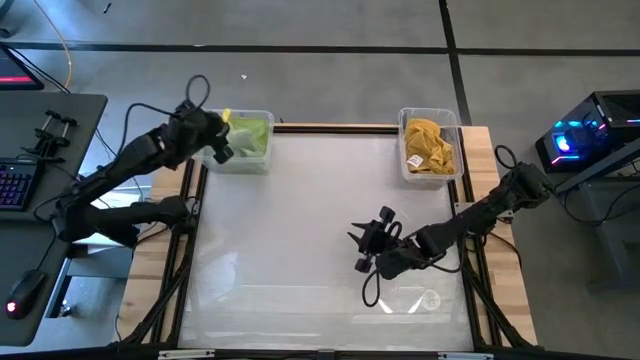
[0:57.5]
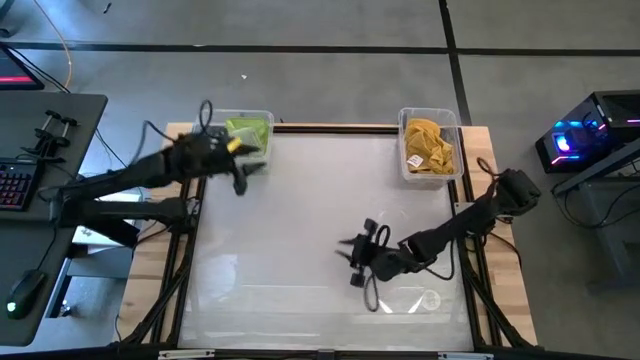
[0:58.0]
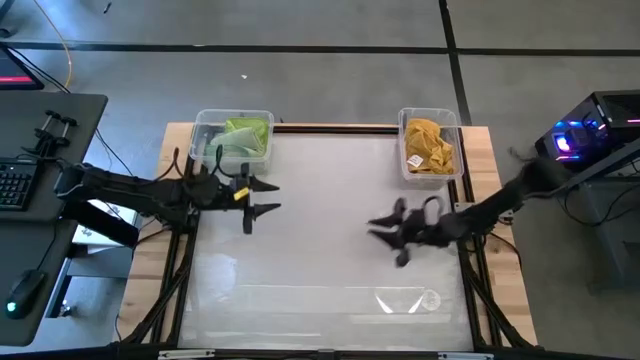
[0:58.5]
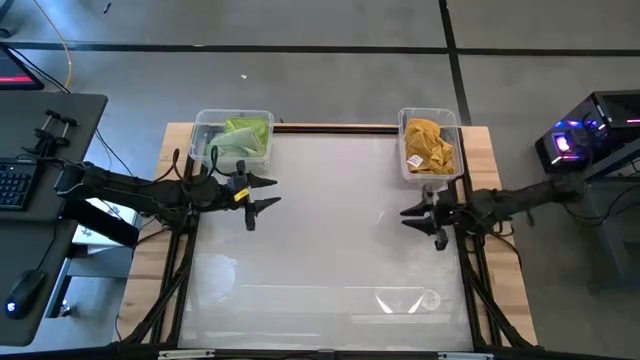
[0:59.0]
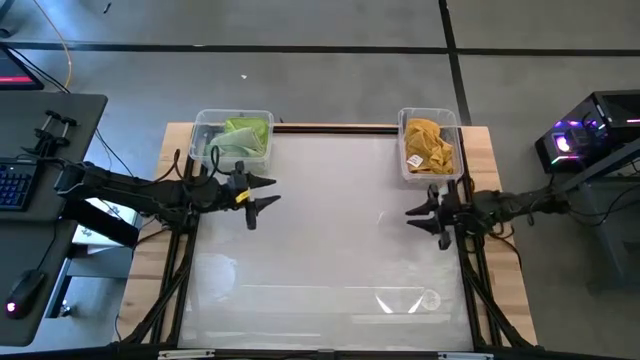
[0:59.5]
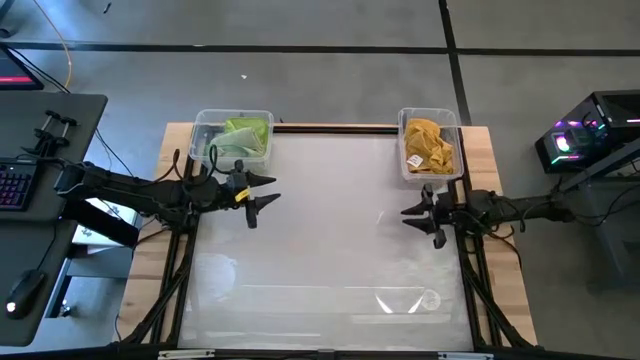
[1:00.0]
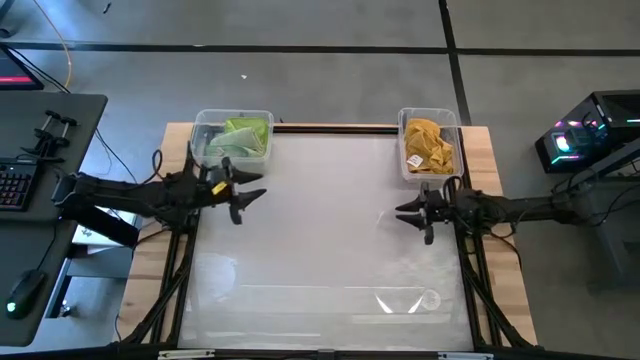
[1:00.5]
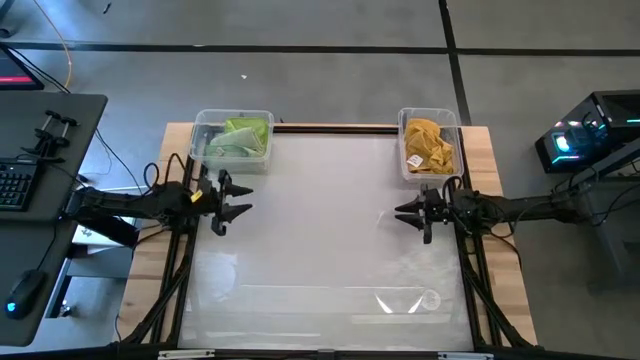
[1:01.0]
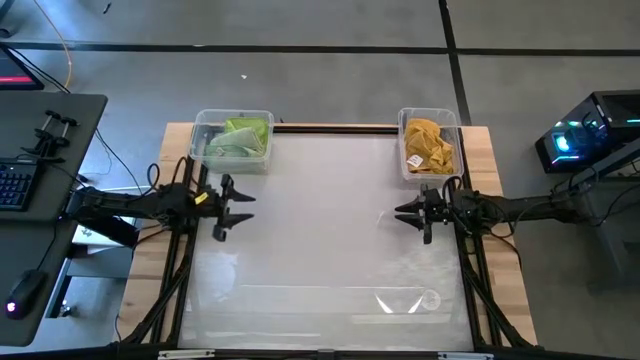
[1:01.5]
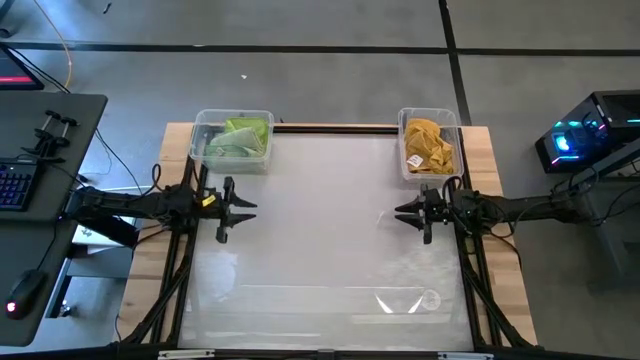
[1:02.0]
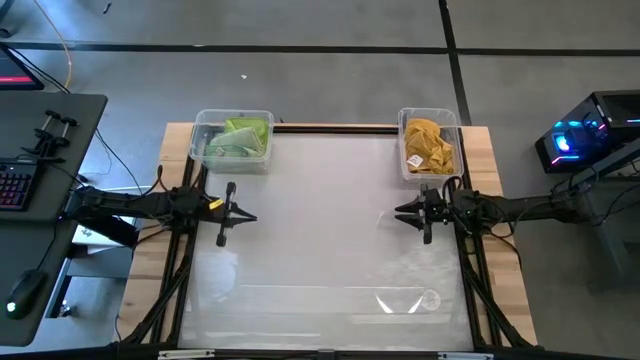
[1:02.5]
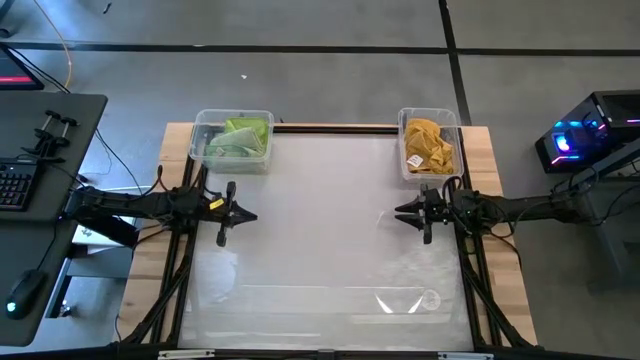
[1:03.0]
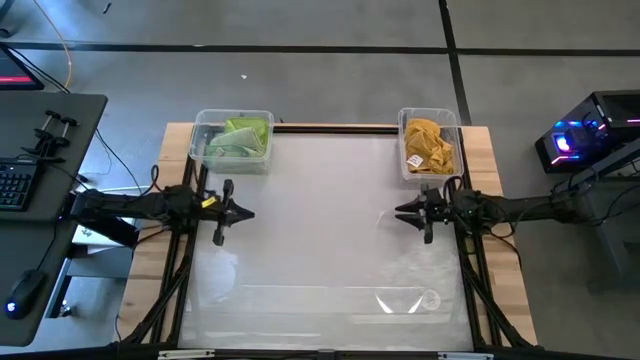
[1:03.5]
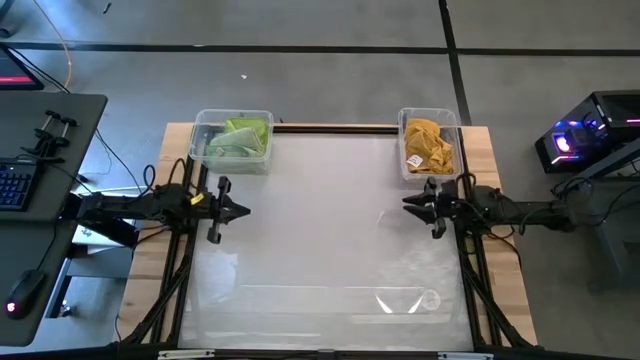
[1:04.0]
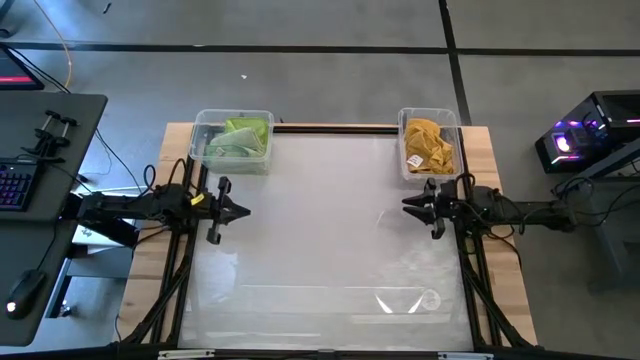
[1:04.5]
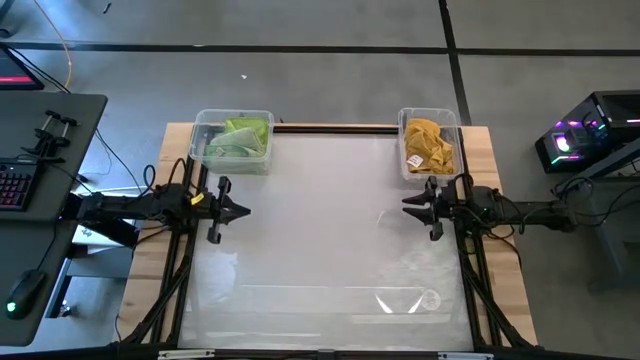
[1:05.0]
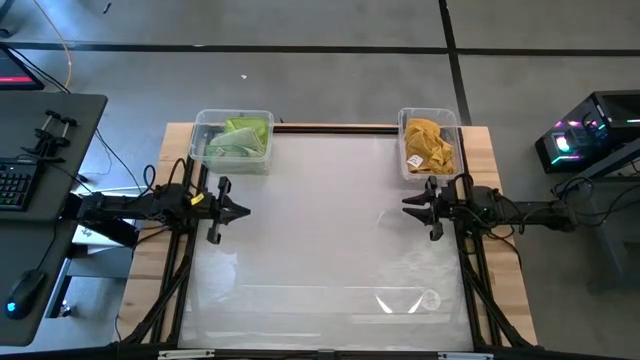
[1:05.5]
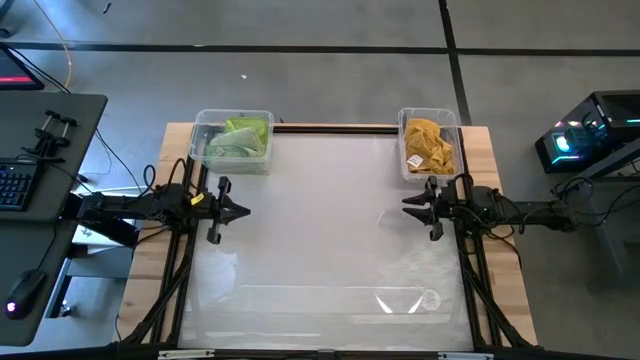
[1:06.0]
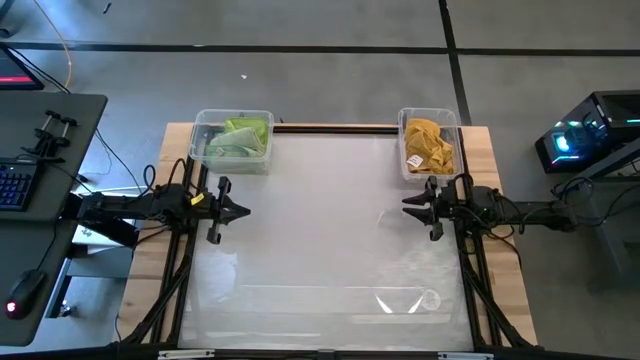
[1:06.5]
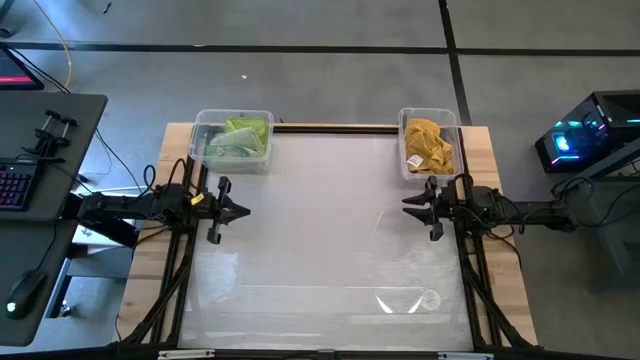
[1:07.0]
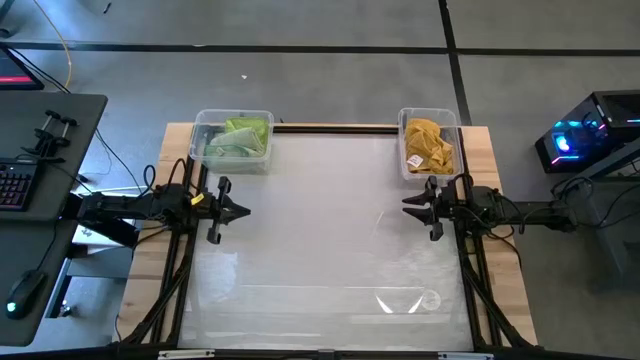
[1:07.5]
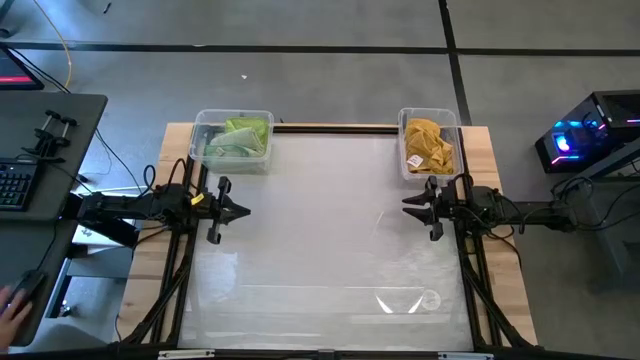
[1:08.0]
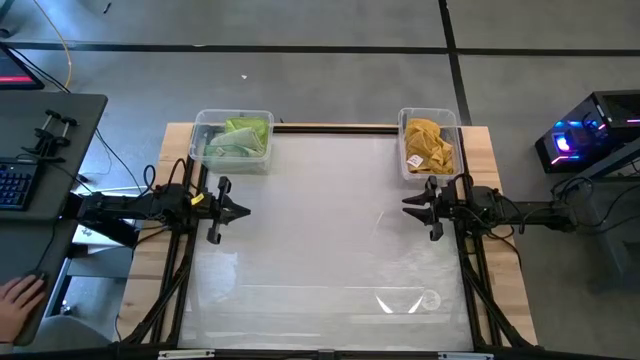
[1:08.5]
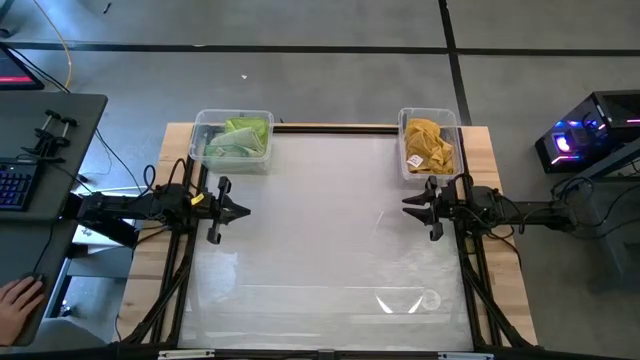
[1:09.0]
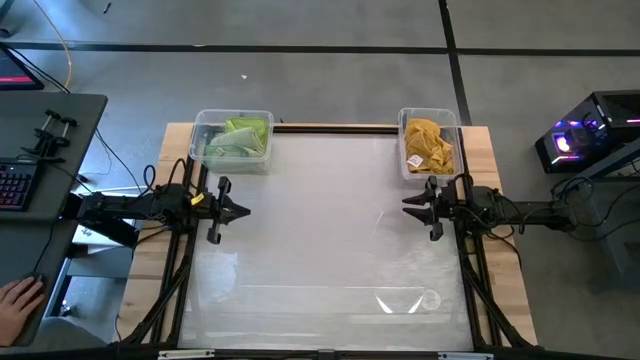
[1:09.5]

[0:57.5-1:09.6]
Task: Sort towels by color in basket
Return to Home Position

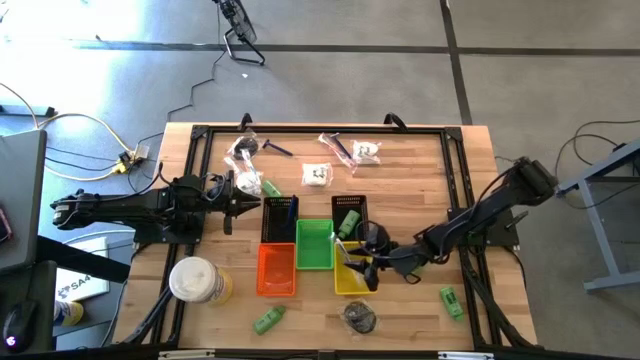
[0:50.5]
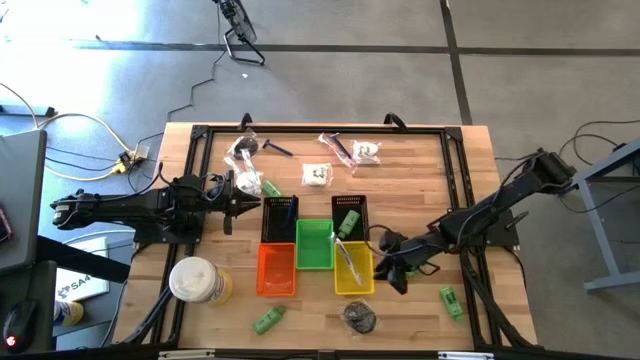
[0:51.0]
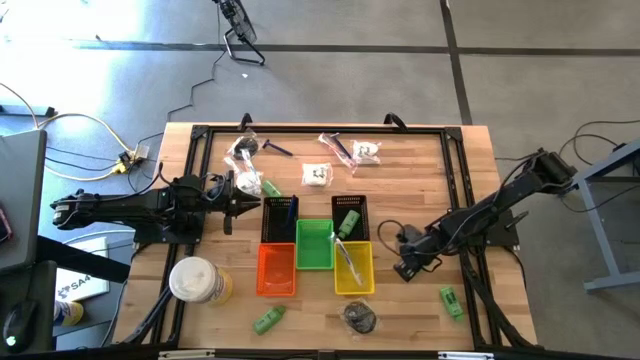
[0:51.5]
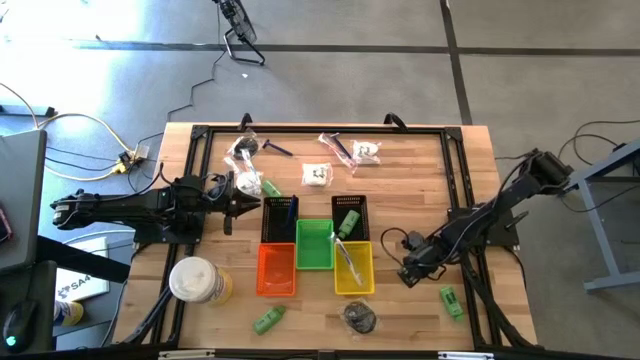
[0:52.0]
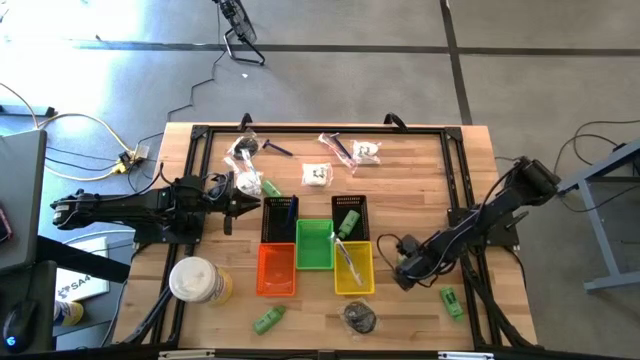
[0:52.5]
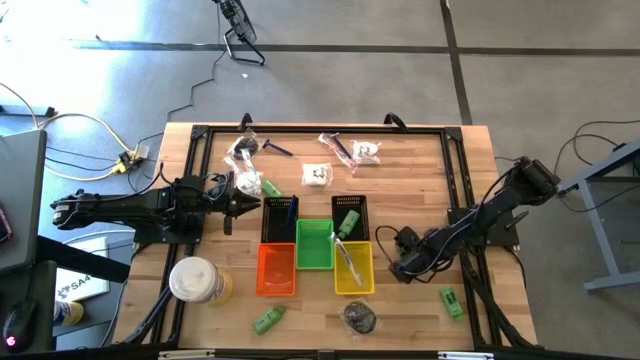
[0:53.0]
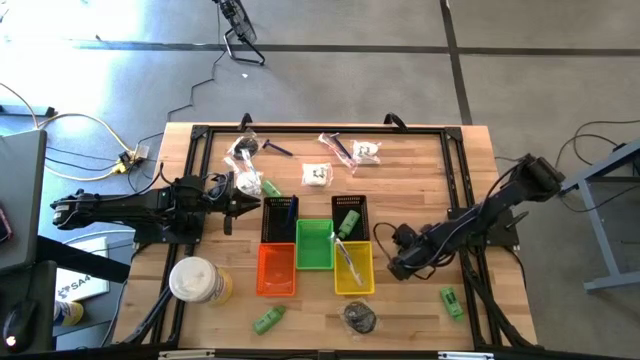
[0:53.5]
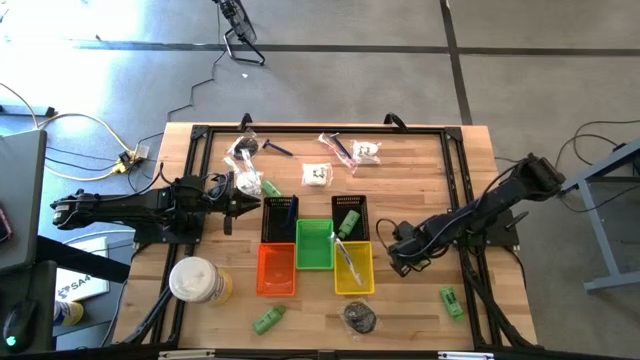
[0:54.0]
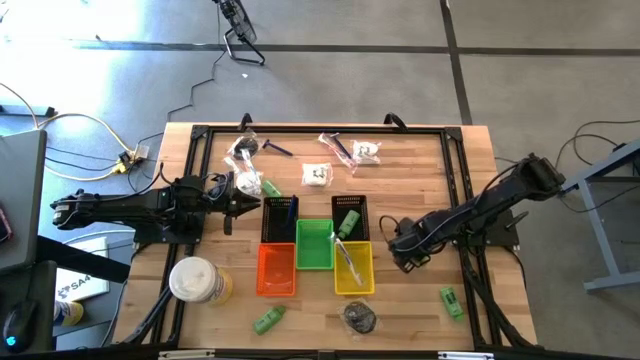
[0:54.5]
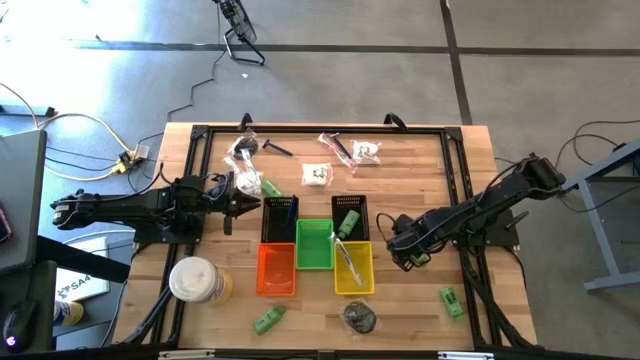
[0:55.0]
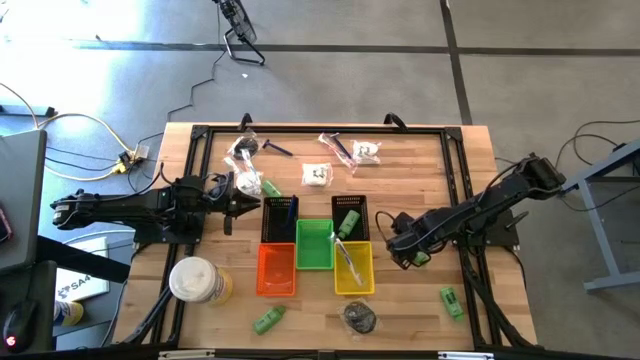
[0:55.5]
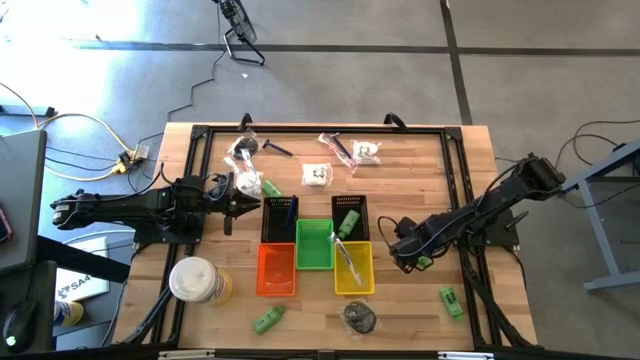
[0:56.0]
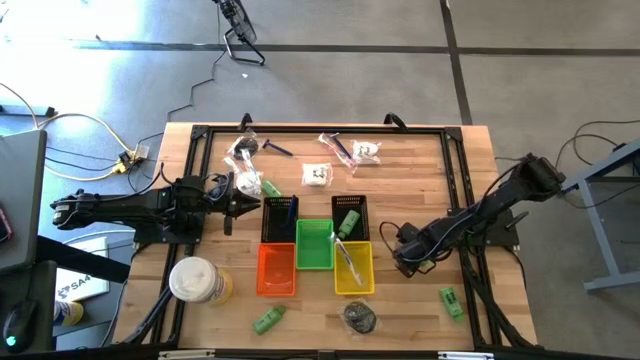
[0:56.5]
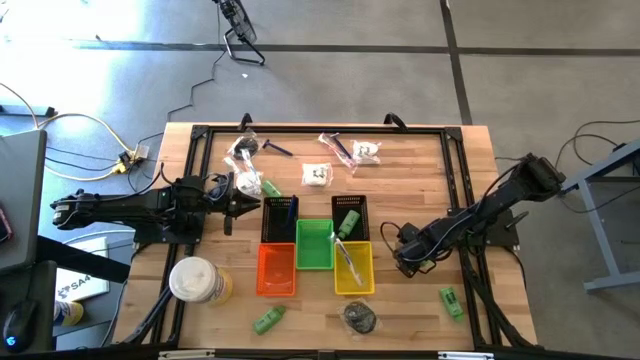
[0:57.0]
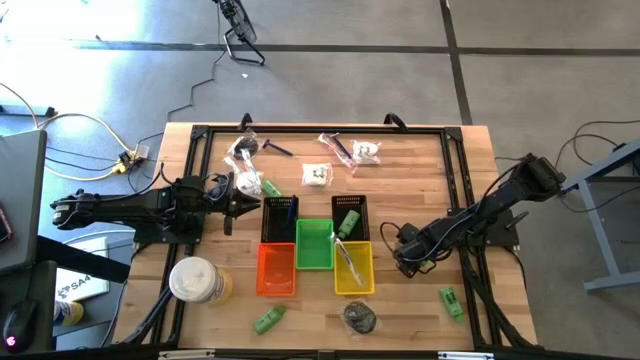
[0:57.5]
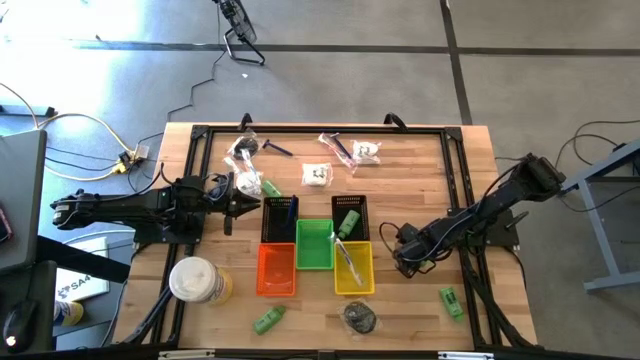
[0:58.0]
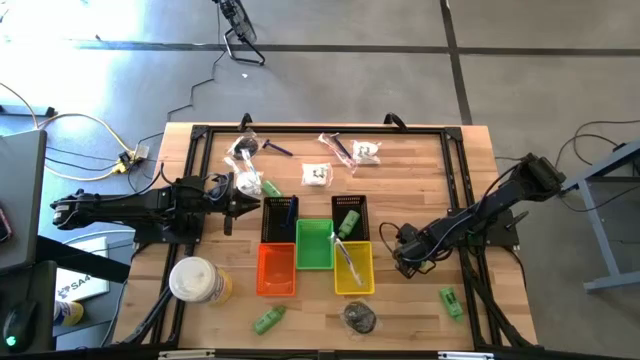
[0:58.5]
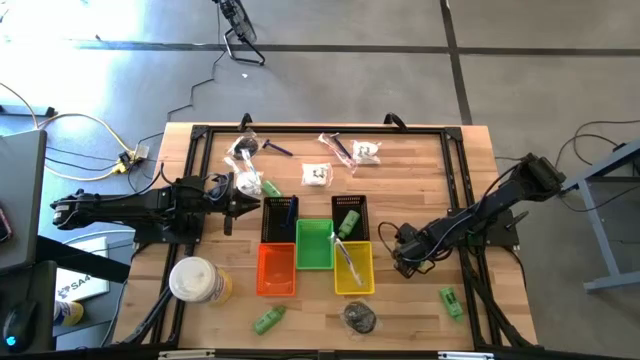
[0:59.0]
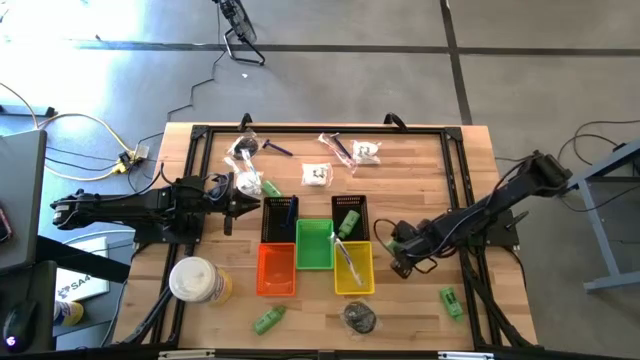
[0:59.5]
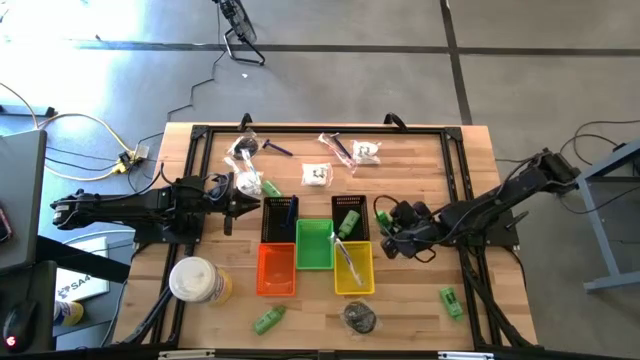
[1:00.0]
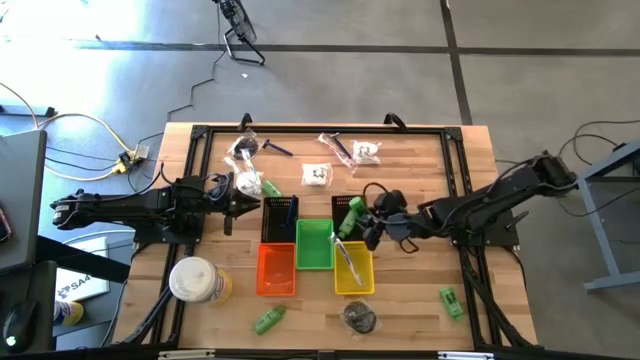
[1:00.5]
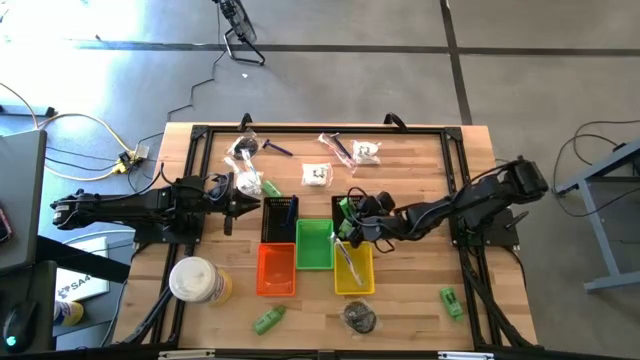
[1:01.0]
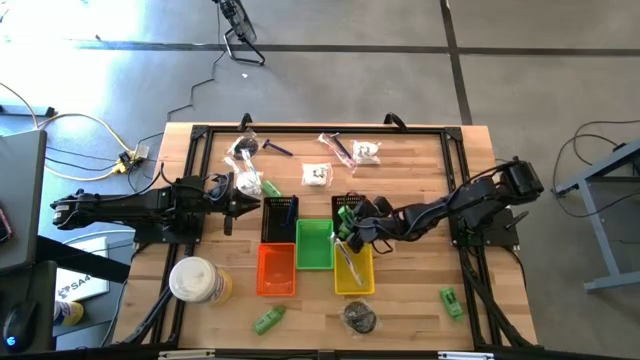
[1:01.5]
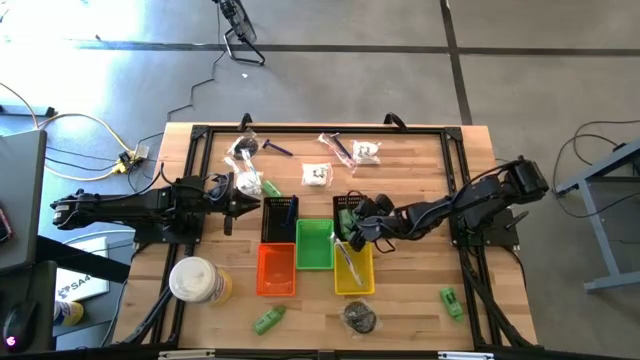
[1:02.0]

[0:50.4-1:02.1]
Task: Pick & Place Travel size toiletries
Put the green shampoo into the right black bin
